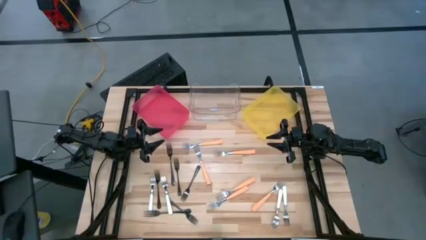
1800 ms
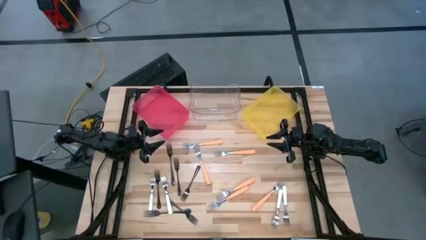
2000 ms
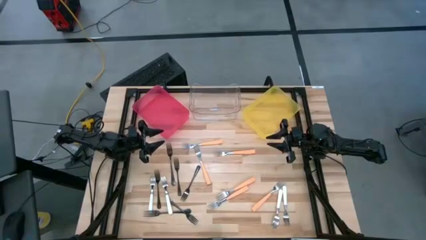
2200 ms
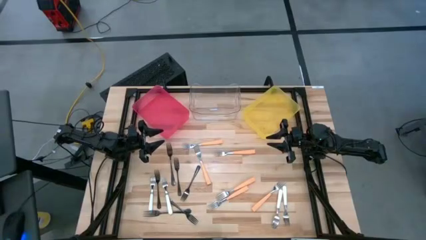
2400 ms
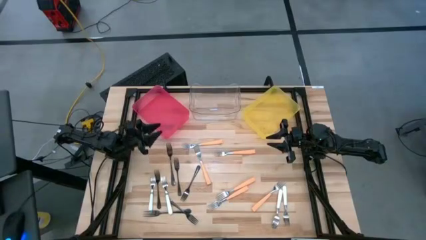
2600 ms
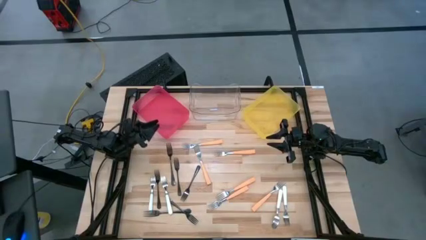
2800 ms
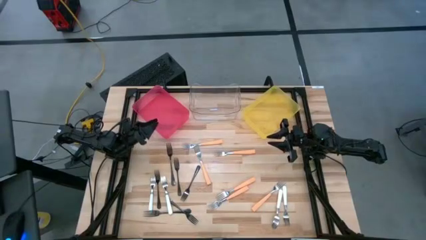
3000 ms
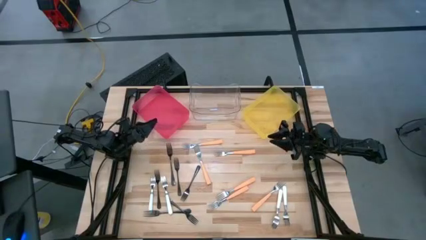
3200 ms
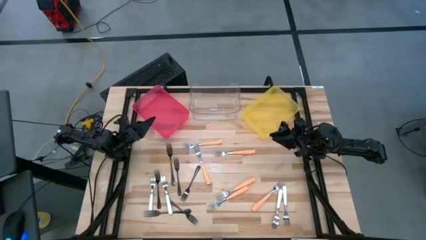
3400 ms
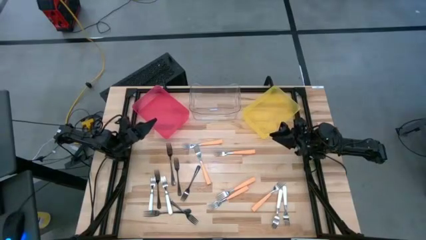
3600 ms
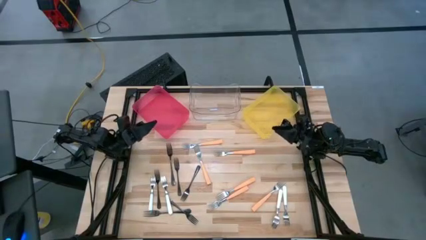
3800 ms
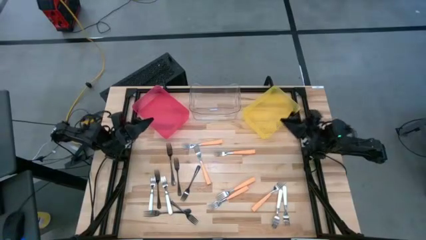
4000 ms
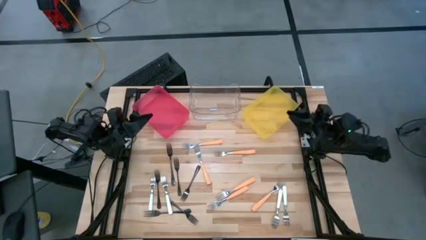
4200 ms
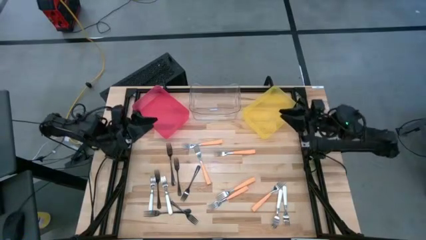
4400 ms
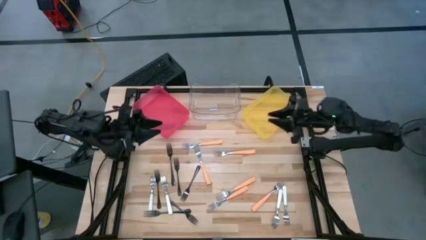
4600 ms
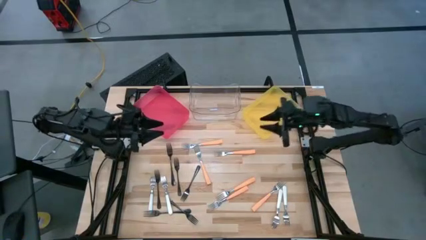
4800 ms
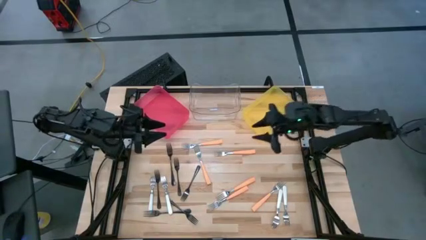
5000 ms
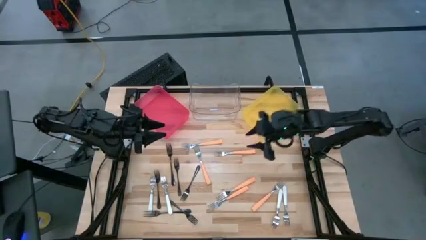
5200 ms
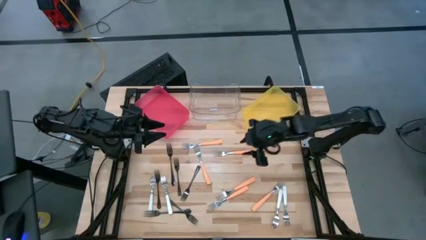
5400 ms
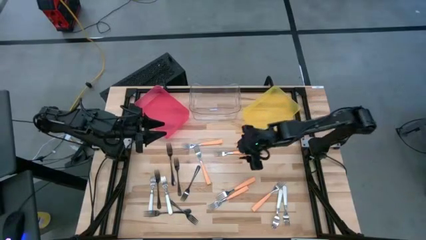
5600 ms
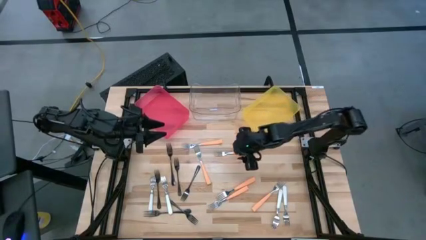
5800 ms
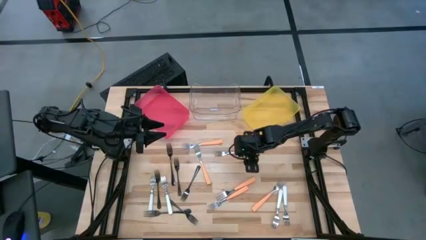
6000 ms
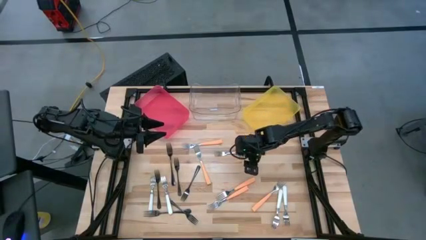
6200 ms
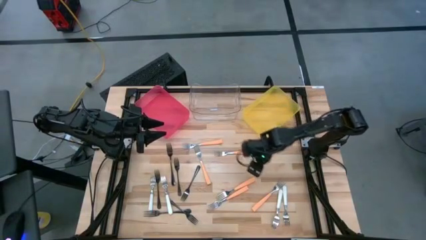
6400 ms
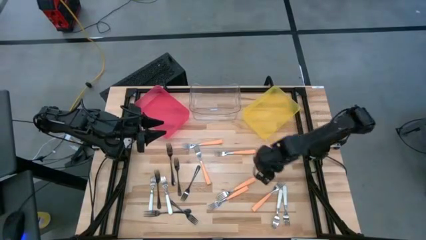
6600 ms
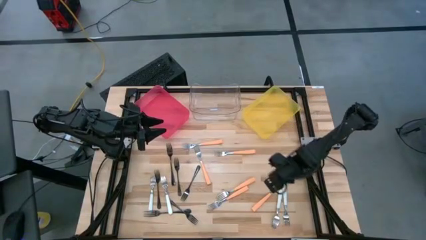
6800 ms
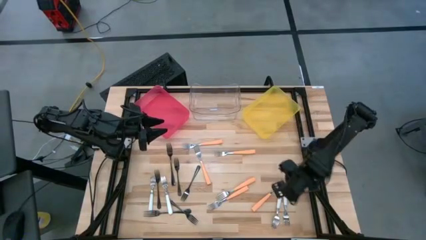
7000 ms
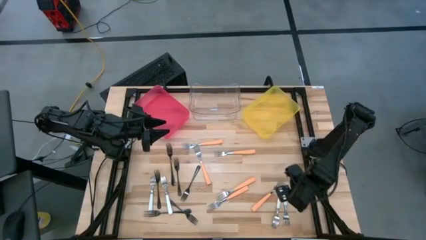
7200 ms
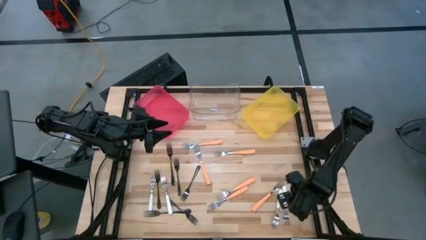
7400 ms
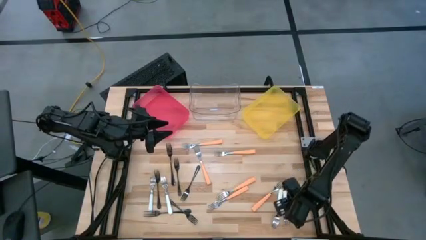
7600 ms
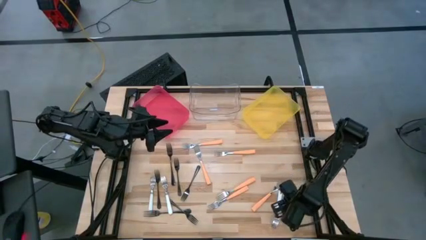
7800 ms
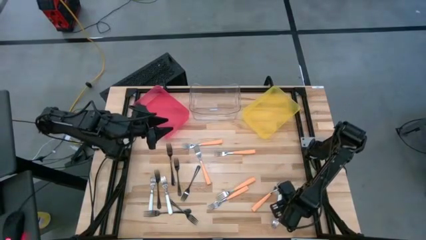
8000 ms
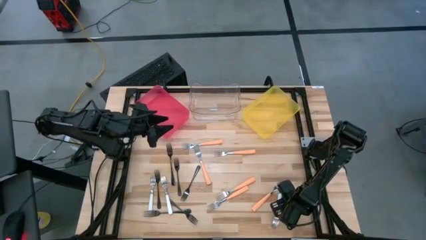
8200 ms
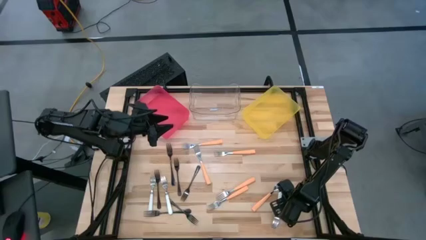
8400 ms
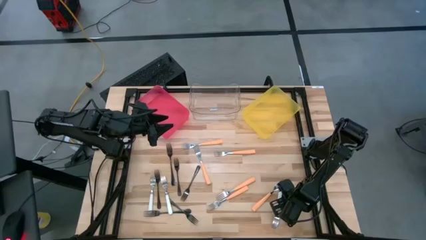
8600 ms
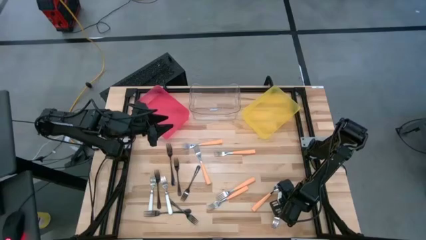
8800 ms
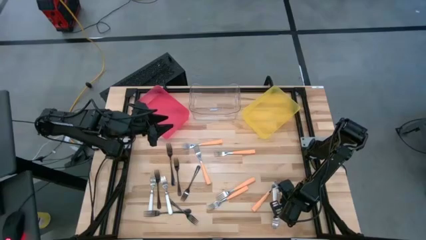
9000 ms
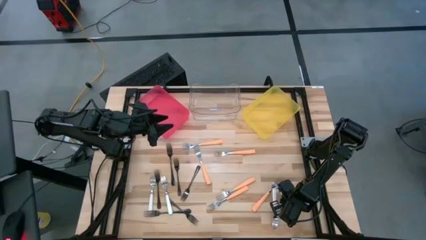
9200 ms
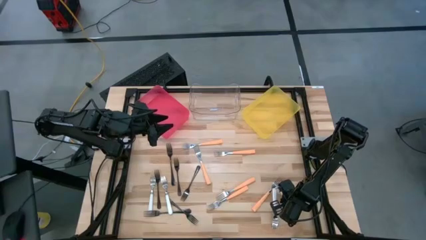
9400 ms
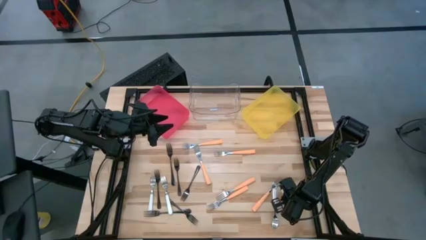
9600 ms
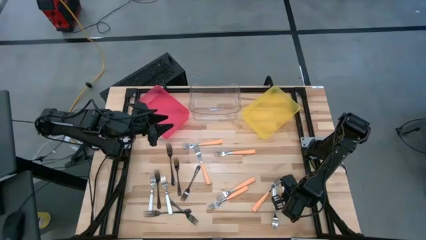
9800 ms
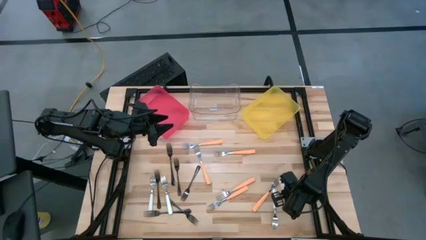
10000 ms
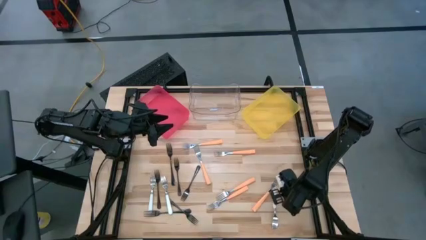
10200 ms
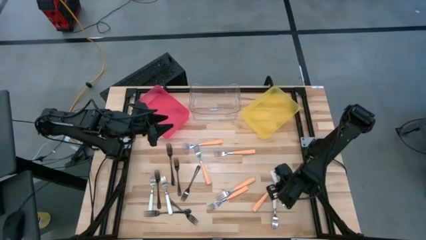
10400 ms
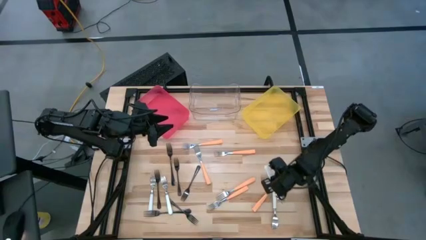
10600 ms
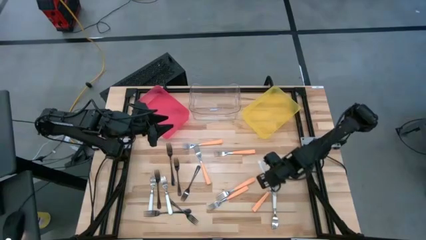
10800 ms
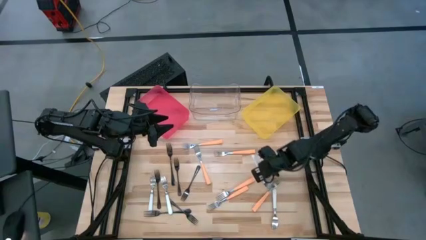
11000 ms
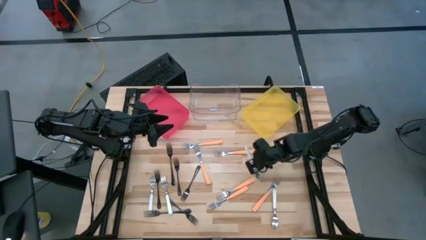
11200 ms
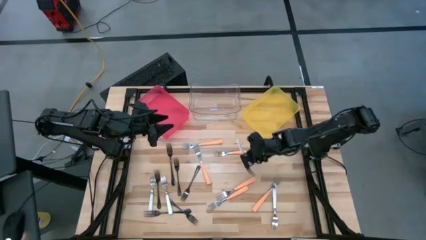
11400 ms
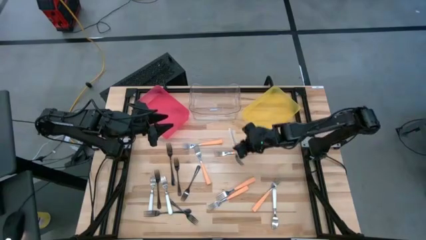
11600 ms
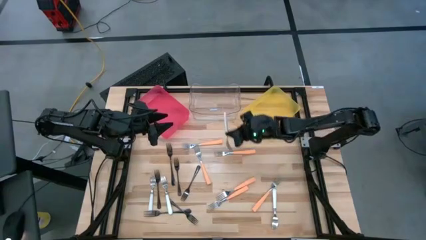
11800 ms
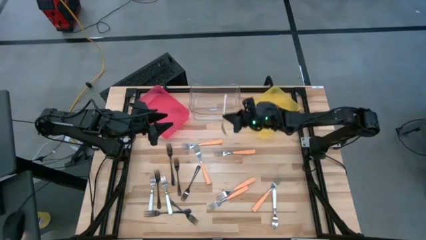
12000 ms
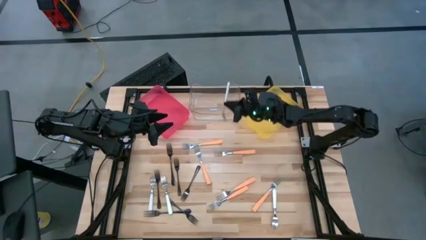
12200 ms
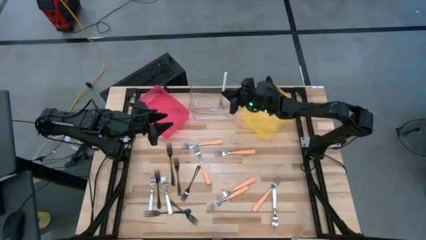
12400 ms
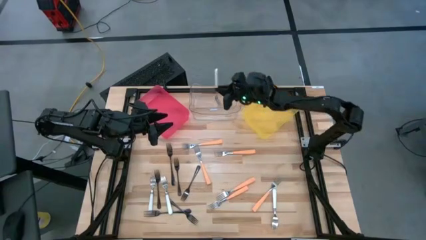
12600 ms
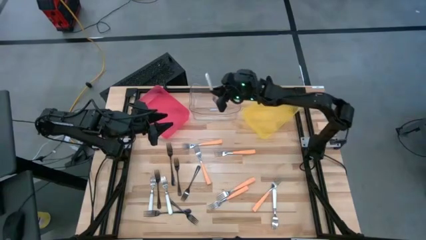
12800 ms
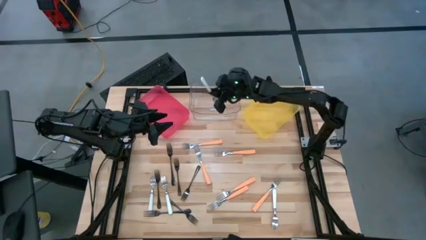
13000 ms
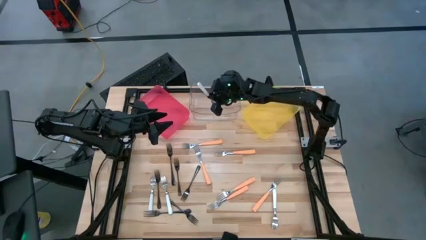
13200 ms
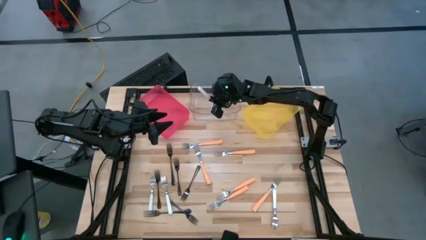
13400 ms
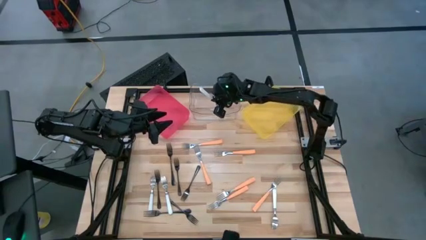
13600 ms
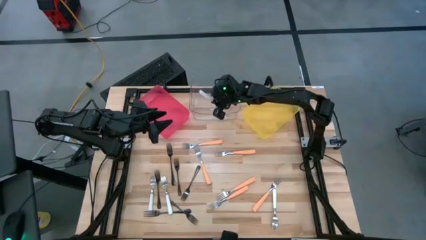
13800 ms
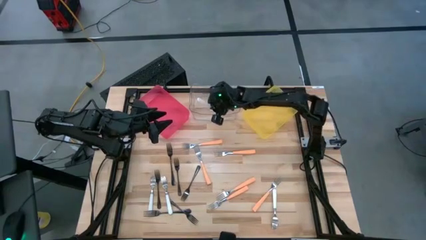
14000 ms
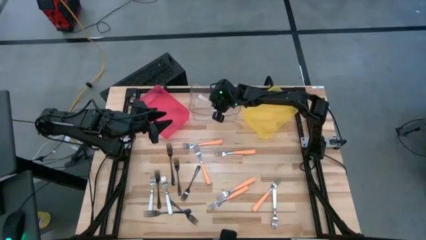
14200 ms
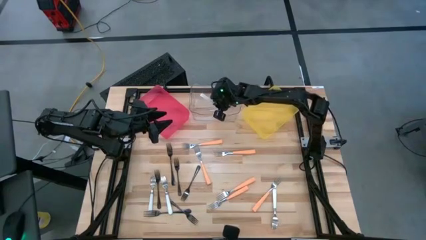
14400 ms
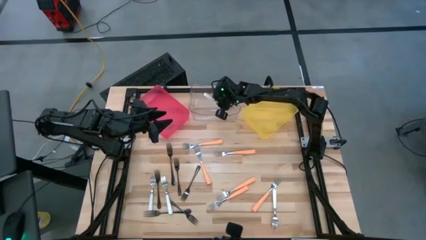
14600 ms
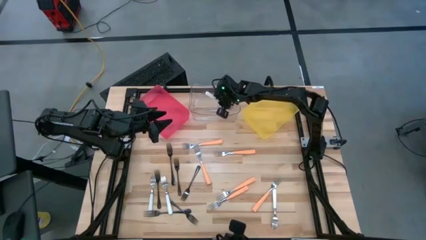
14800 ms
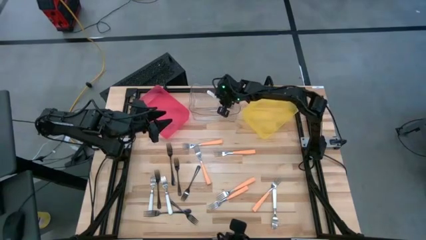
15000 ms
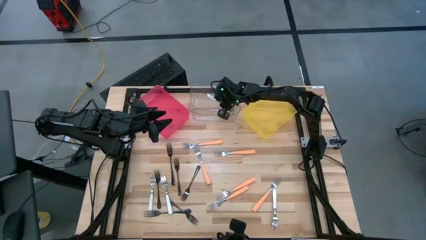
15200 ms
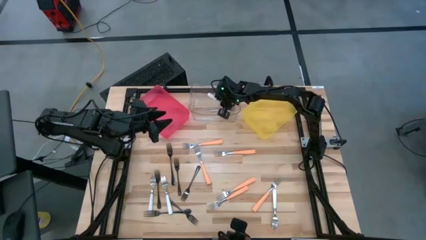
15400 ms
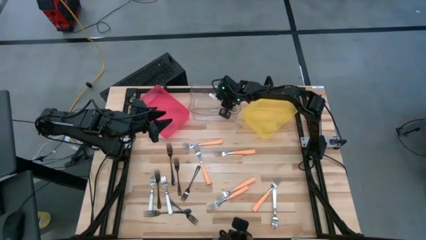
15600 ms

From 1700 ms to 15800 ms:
Task: Sort silverware by color (type)
Put the white fork into the transparent bin
